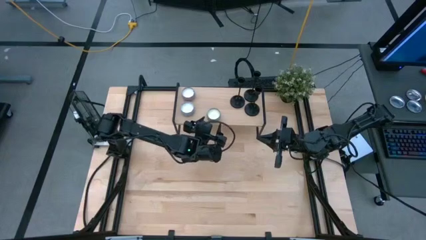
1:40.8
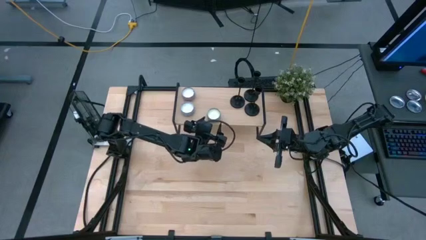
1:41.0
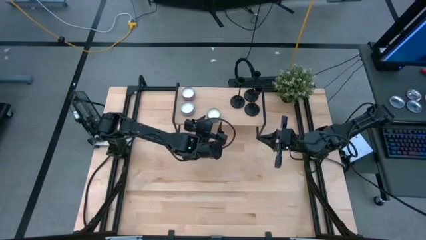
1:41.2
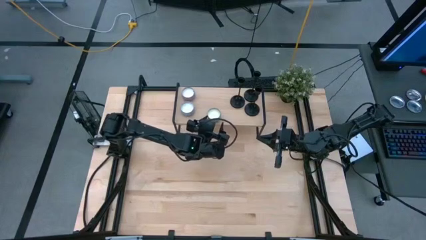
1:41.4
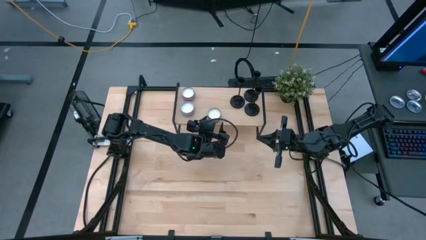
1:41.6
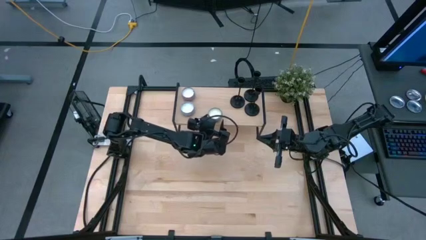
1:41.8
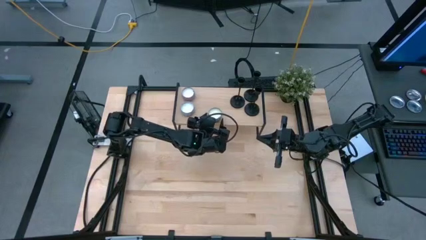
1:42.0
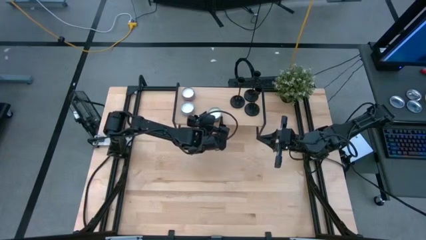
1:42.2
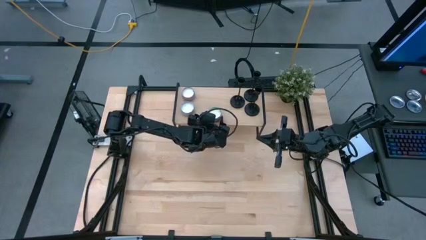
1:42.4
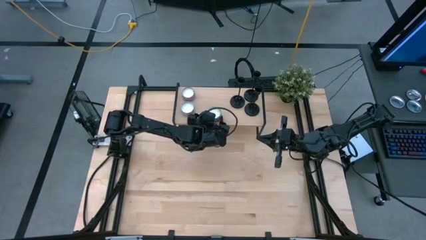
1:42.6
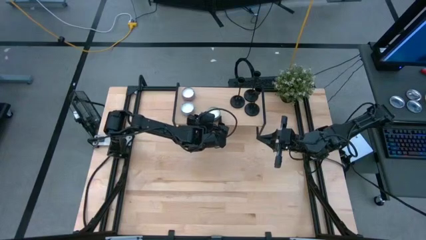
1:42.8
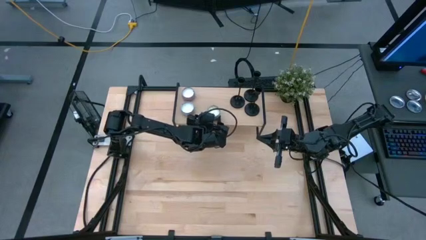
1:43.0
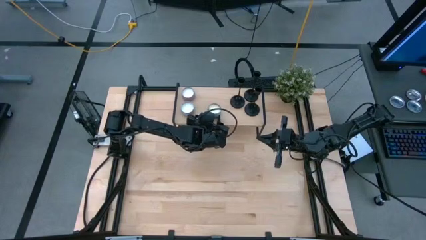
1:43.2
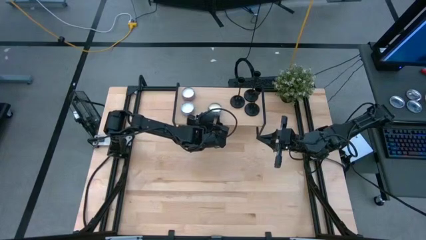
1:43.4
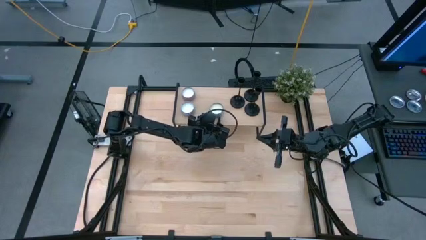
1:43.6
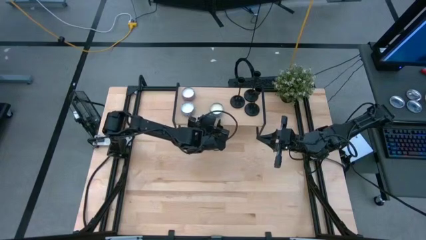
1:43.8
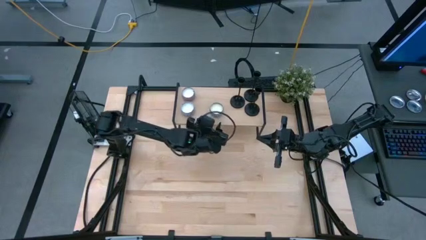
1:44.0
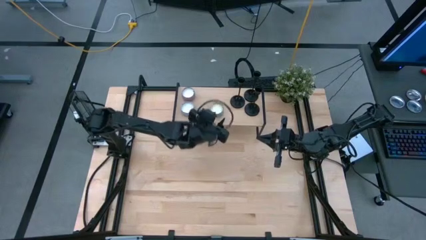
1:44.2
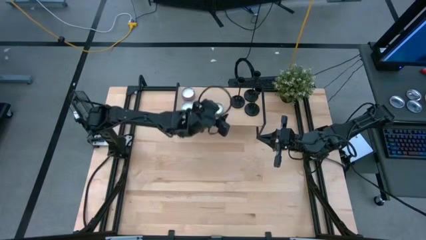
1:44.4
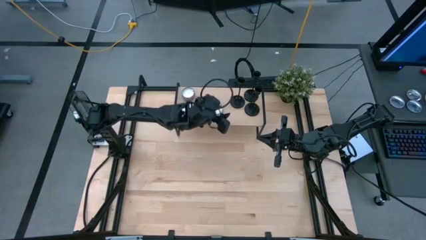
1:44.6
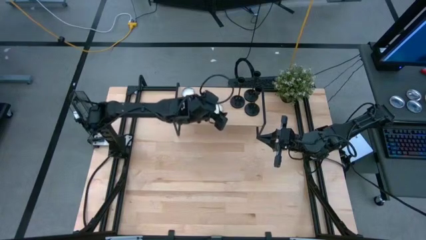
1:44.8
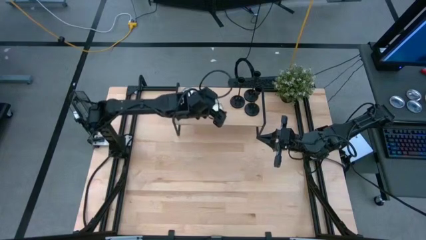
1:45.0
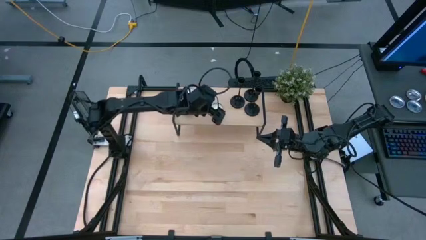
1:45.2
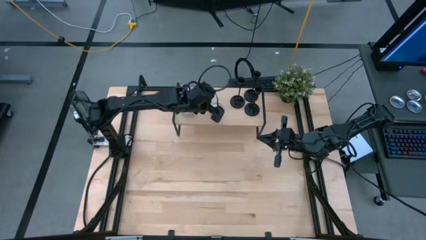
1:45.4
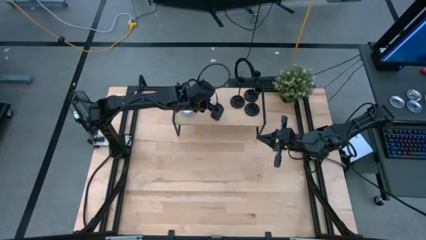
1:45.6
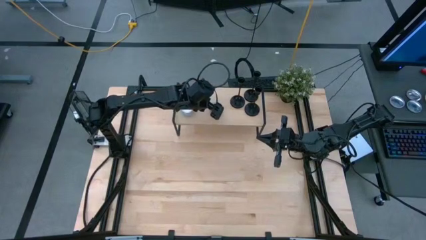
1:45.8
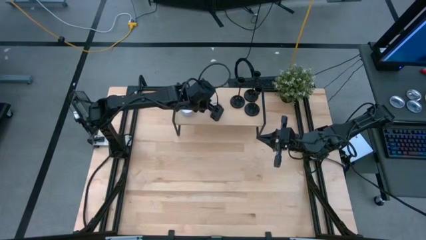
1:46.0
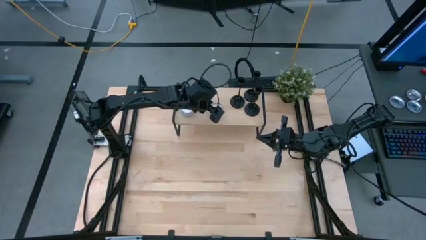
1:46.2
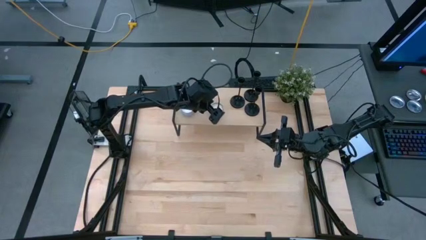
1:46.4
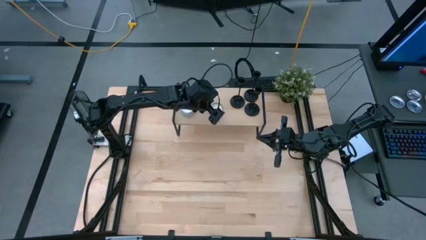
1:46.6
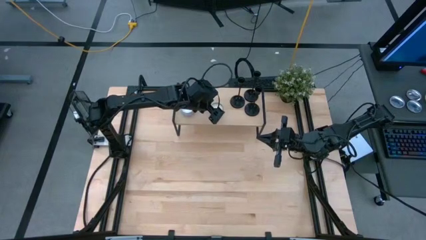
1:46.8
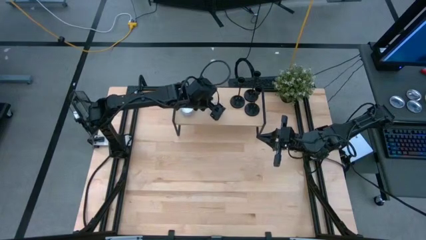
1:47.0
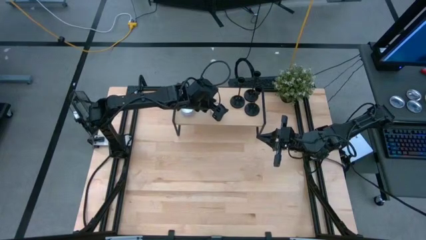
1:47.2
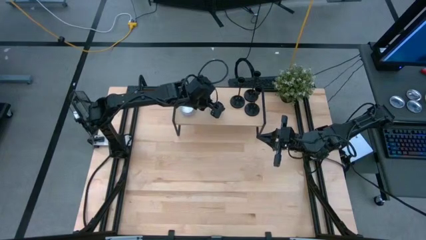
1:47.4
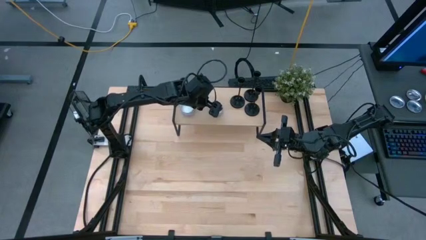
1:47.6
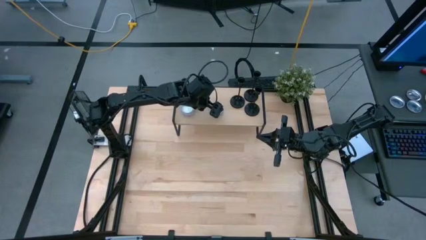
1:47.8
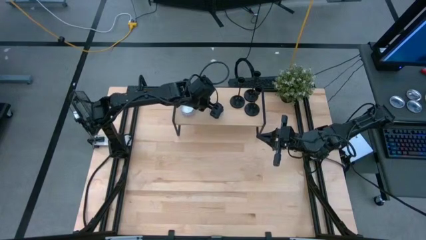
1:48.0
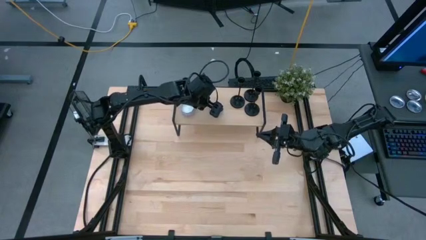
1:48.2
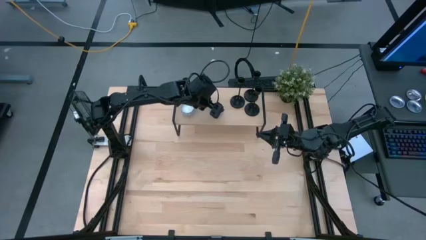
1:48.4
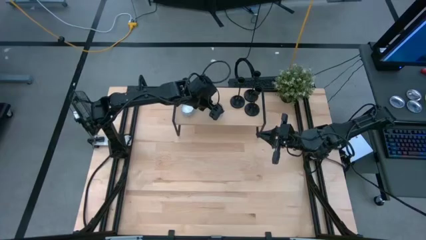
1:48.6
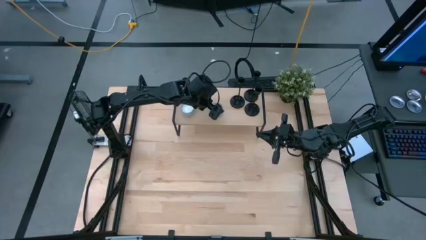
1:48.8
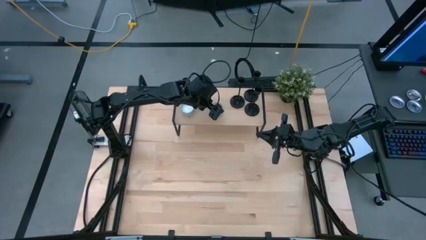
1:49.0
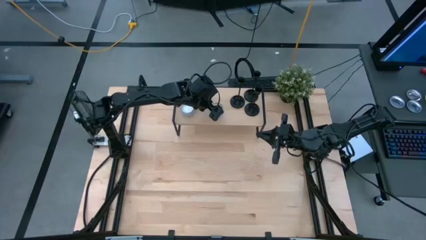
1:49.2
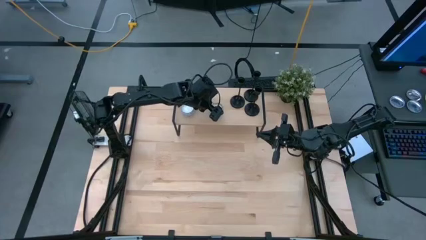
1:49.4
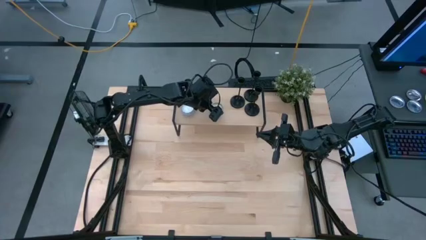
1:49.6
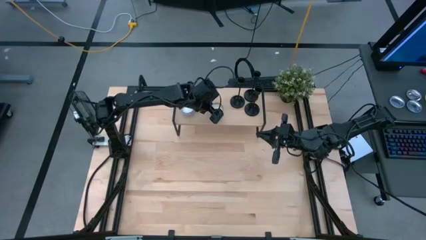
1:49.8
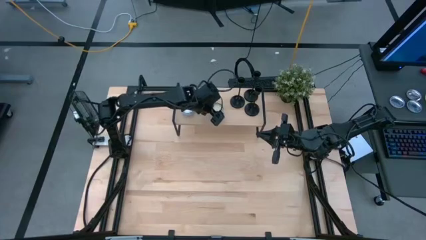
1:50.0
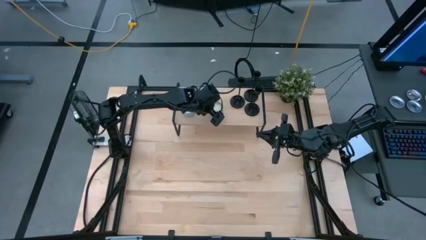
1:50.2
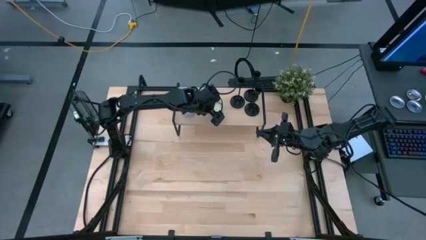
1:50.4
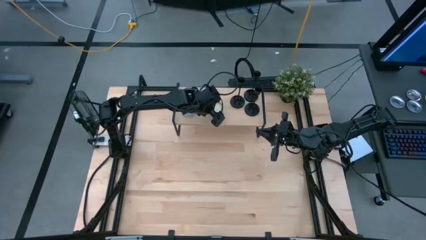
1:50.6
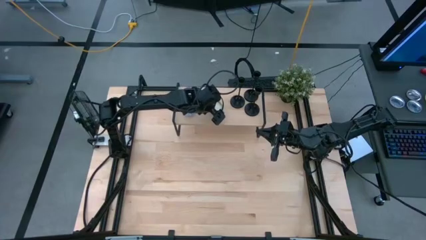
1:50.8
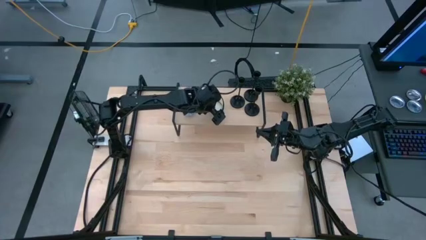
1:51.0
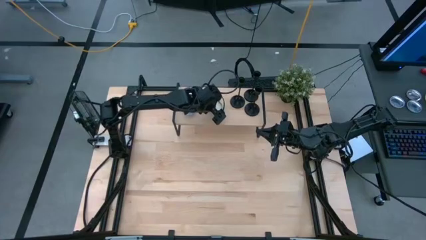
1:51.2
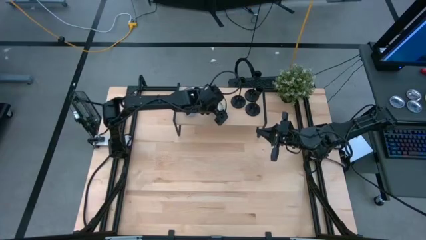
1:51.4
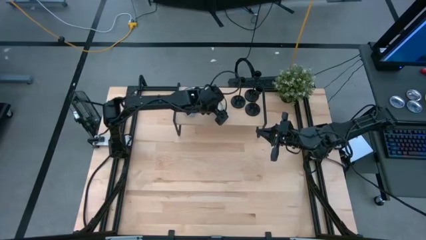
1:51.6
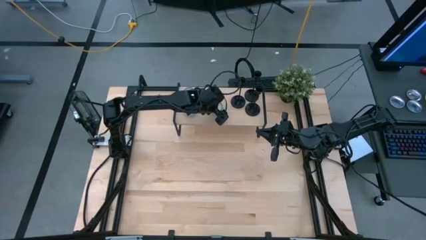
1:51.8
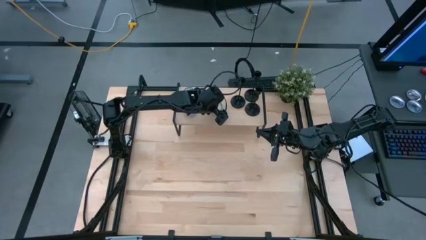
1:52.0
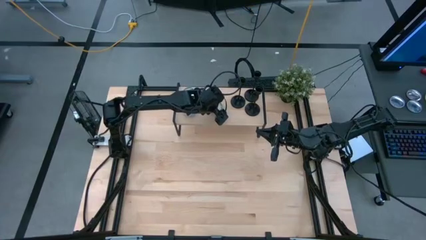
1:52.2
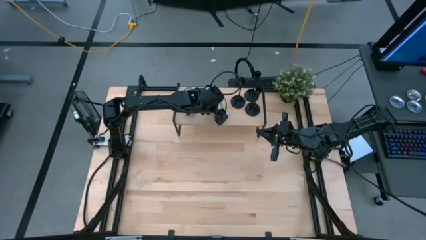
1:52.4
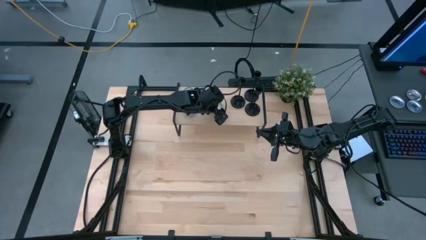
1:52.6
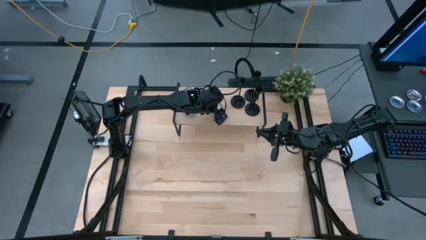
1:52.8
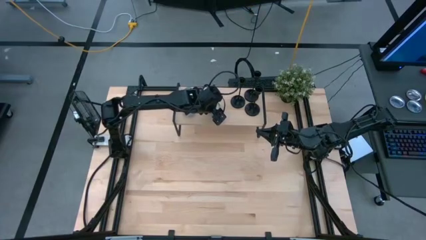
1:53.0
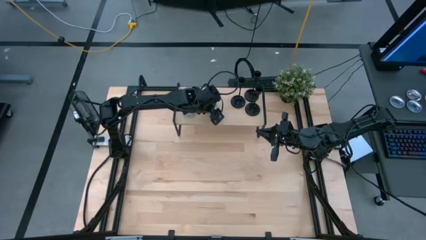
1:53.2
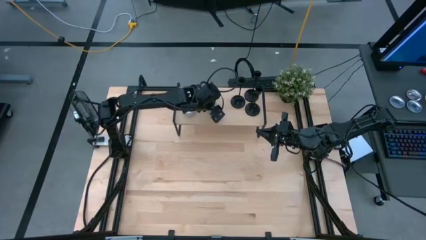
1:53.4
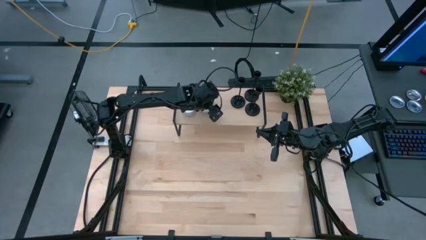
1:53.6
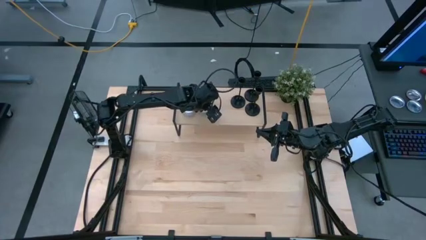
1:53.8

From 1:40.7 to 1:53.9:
Task: Pick & Place candle stick holders
Put the blue patterned scented candle on the shelf

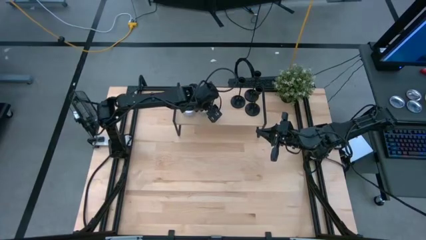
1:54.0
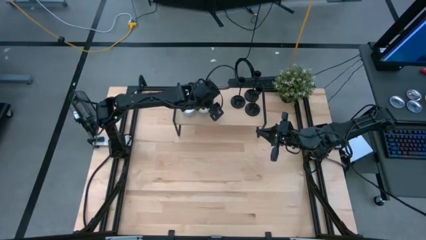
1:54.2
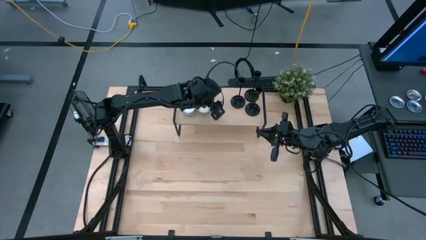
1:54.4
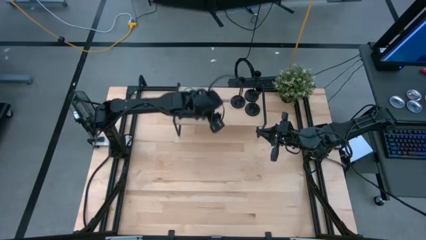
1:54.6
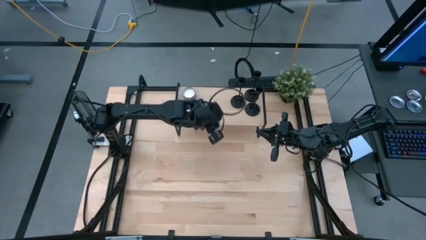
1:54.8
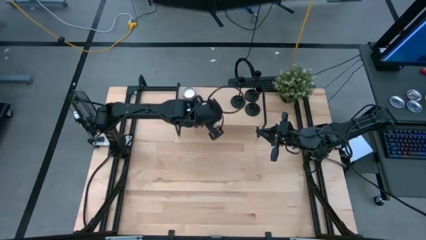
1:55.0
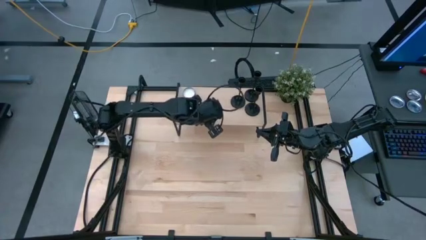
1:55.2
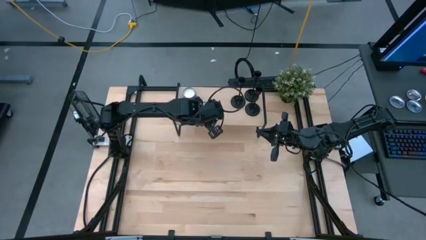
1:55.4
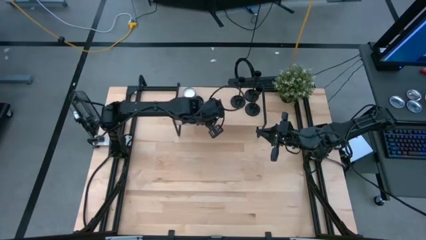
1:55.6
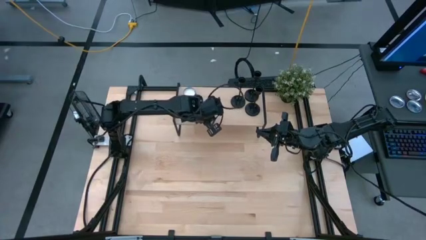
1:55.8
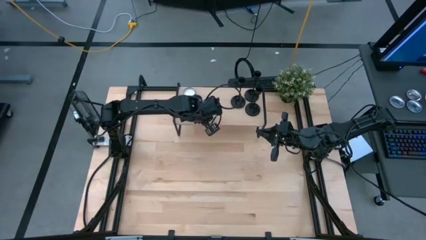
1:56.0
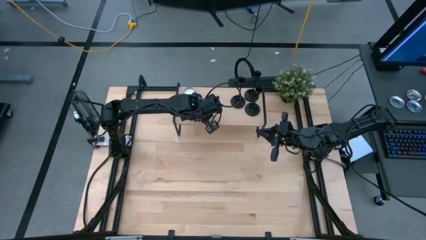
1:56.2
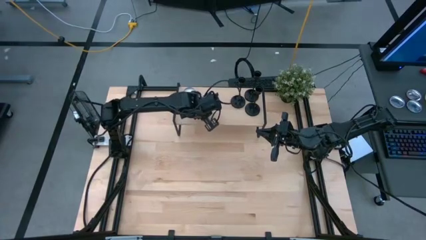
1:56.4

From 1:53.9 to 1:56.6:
Put the blue patterned scented candle on the shelf

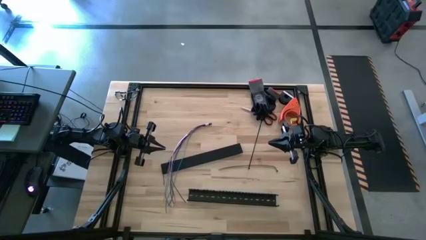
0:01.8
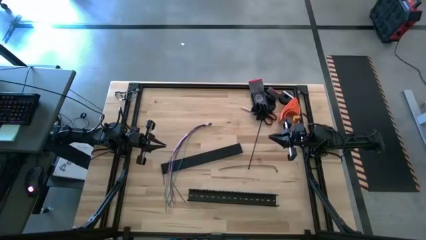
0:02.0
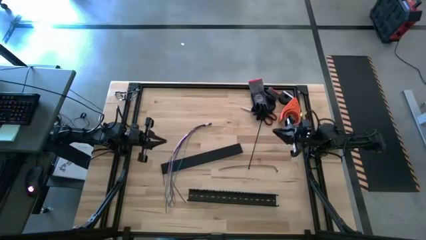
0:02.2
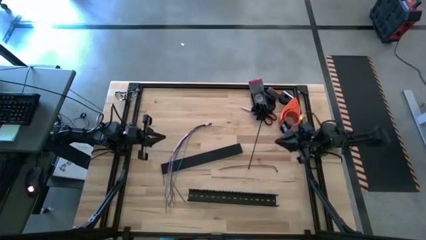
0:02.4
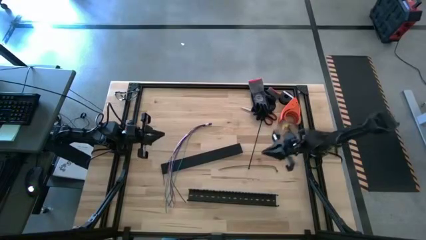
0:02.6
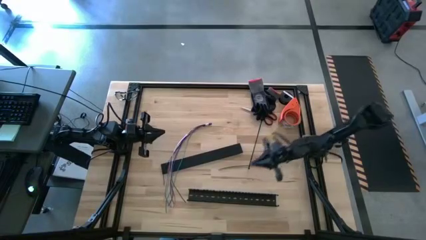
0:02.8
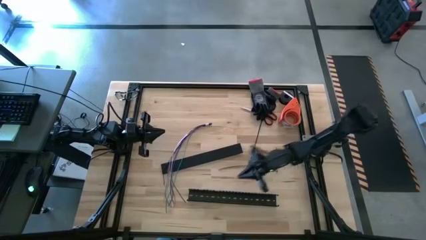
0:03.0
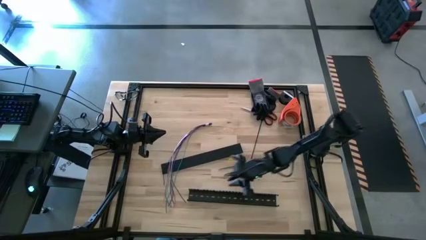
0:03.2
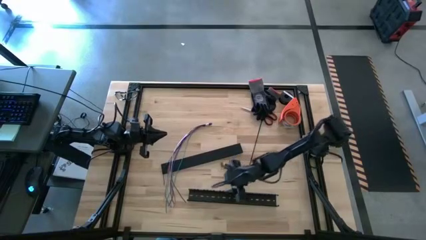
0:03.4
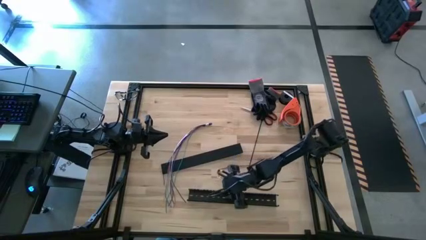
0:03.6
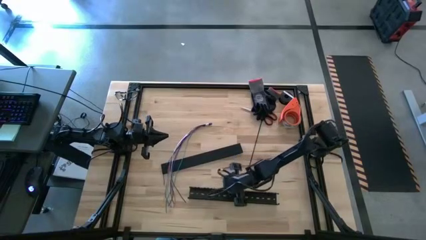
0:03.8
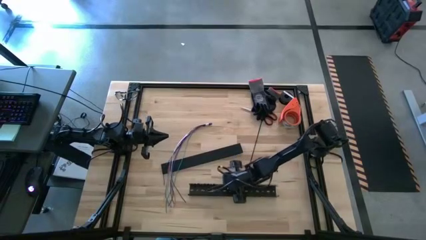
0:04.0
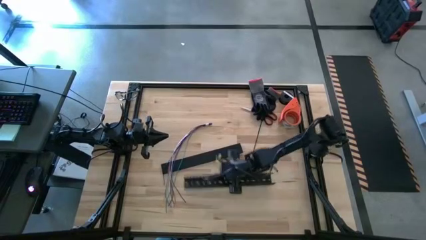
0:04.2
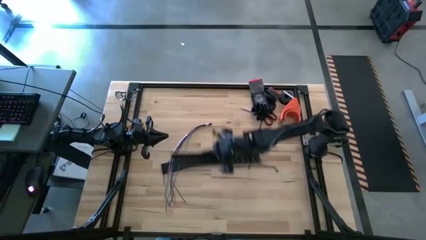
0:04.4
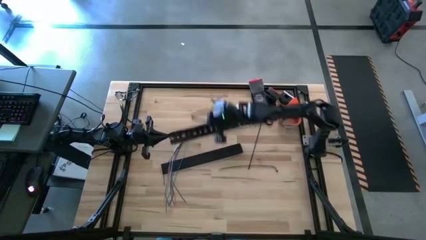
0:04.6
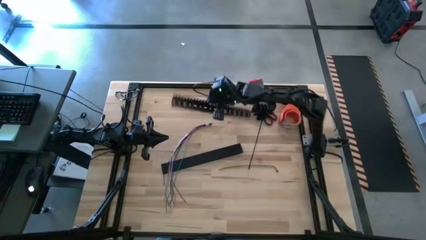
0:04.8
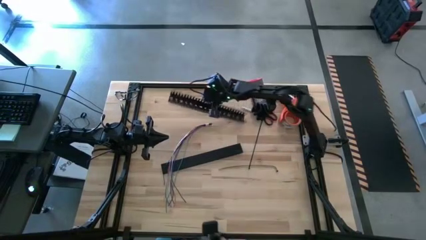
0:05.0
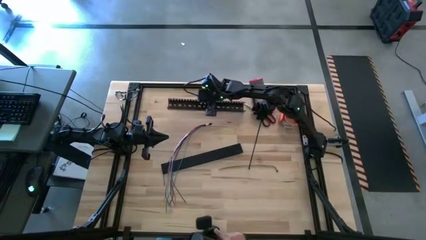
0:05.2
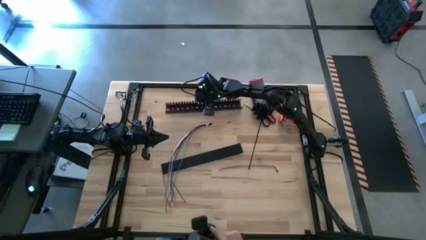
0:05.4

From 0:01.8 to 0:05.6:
Task: Ziptie cables
Move the black cable duct to the top center of the table
